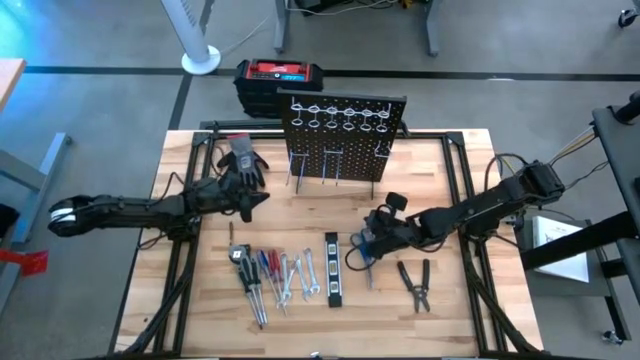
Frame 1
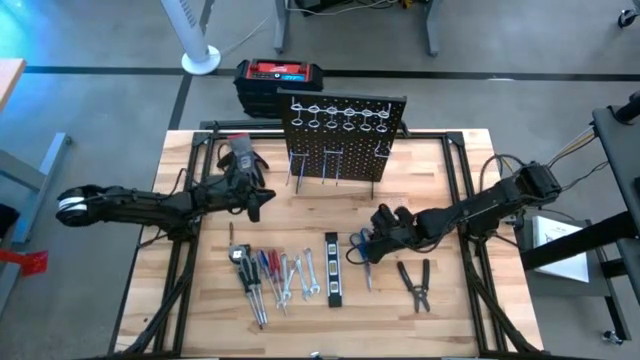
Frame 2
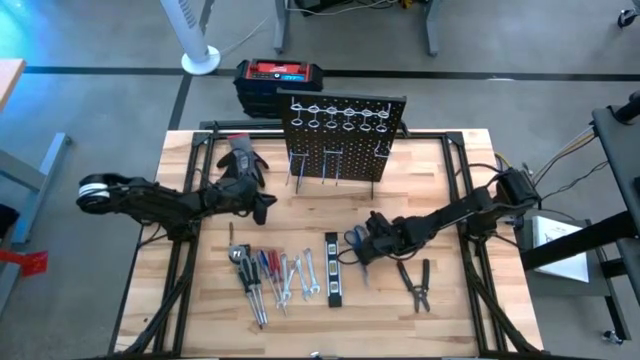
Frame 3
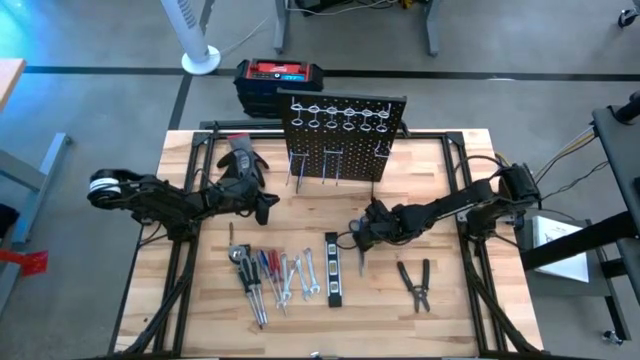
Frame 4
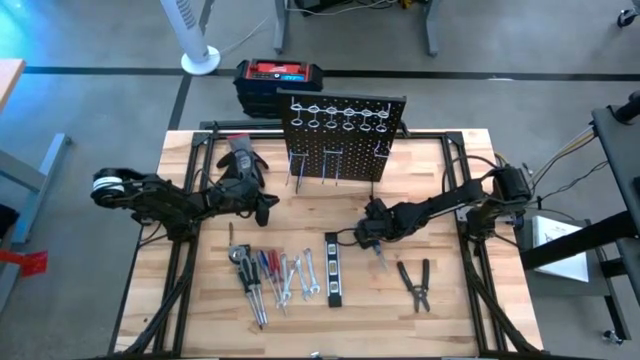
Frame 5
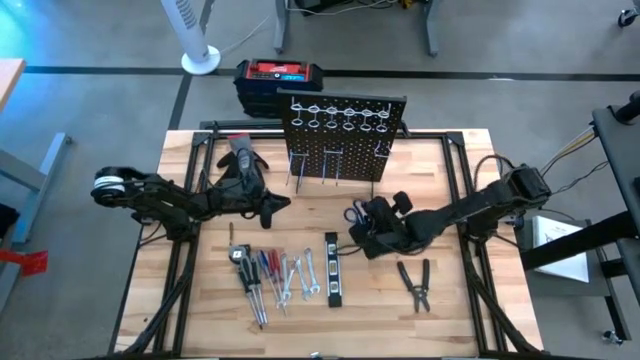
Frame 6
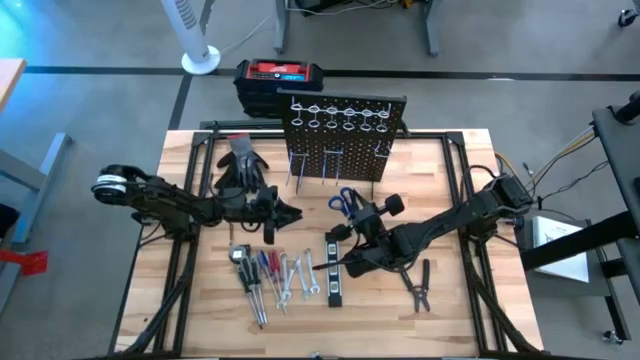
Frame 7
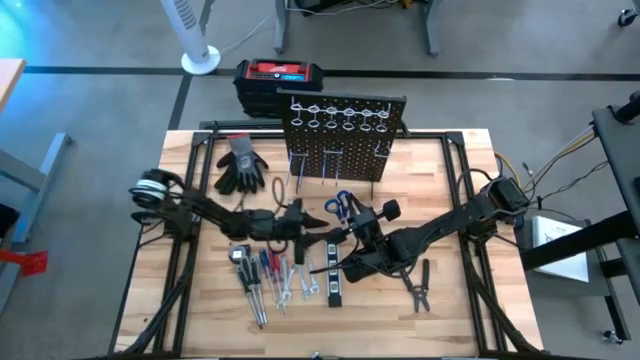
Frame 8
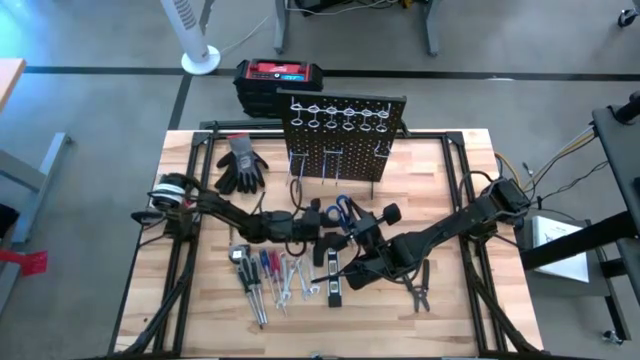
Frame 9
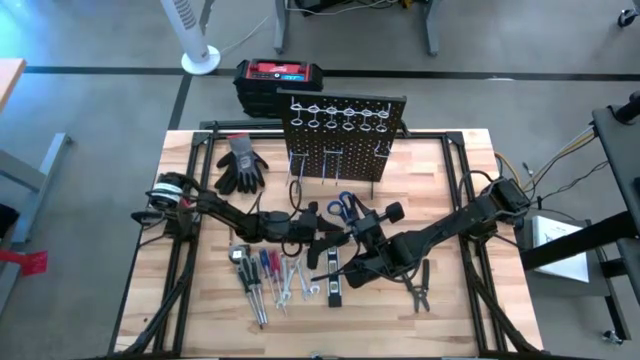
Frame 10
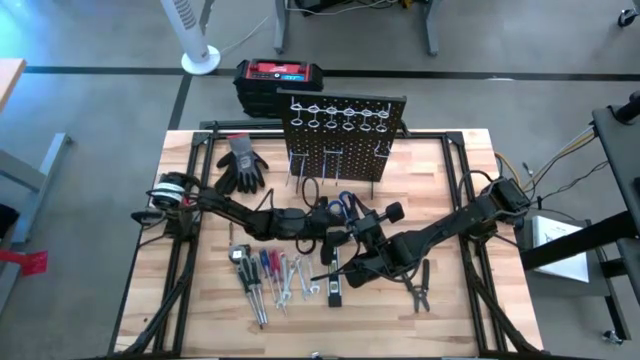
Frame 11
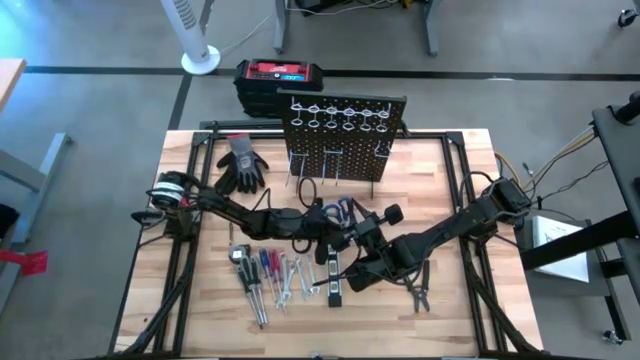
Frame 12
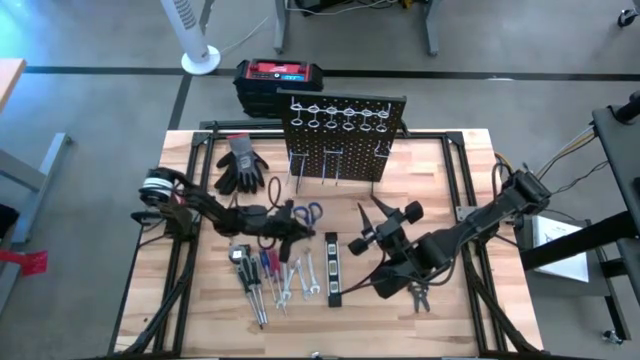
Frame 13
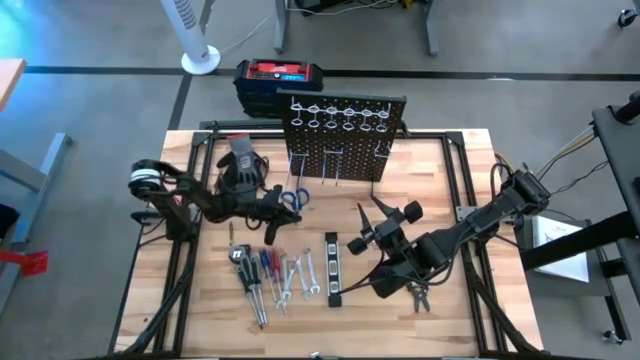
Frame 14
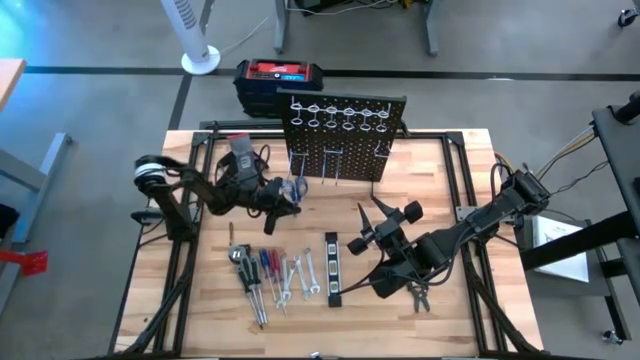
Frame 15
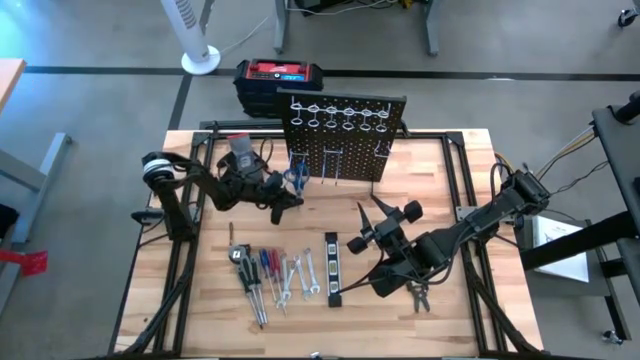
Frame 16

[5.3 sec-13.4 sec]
Task: Hang tools onto peg board
Hang the blue scissors on the peg board

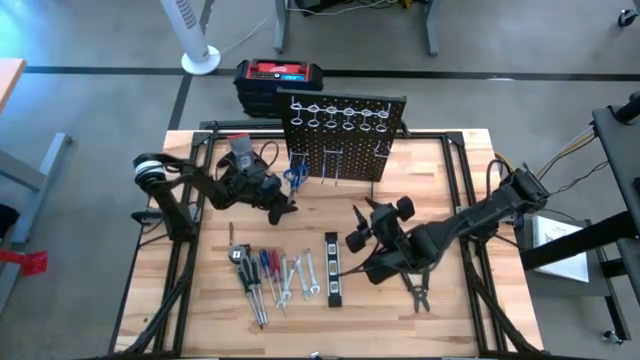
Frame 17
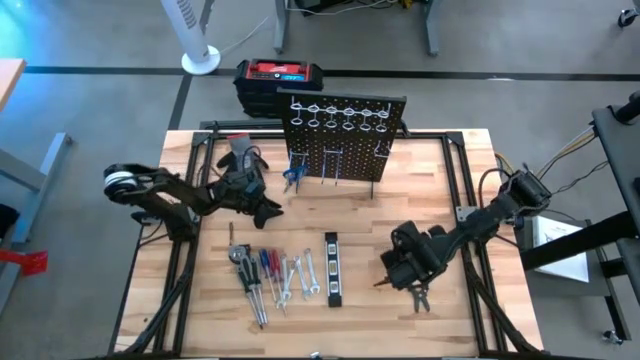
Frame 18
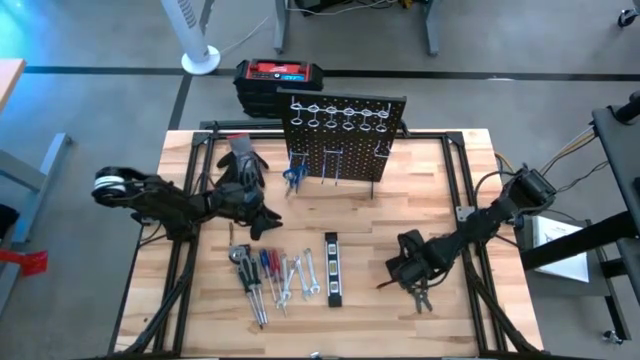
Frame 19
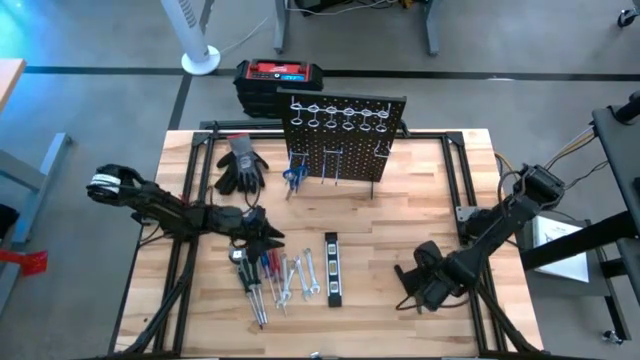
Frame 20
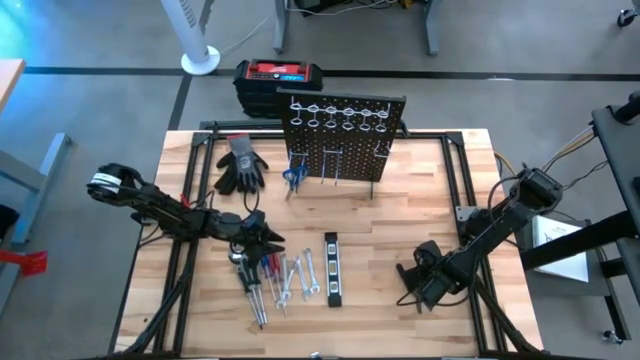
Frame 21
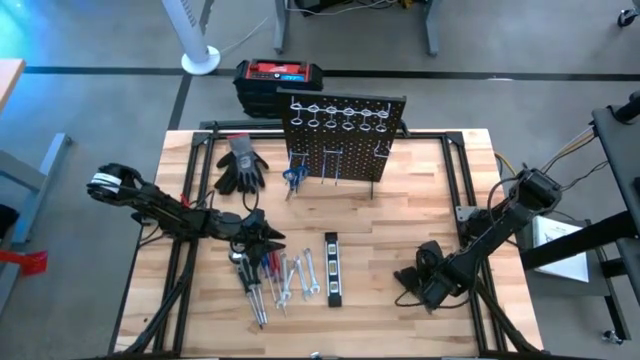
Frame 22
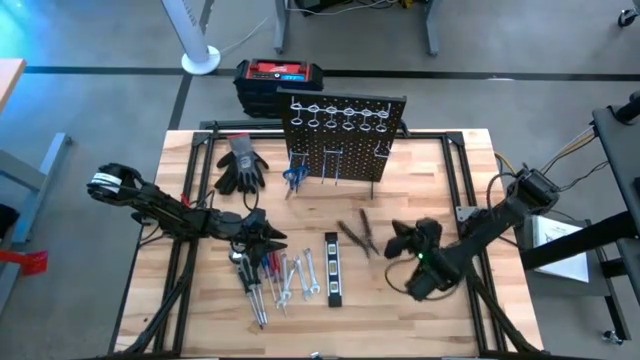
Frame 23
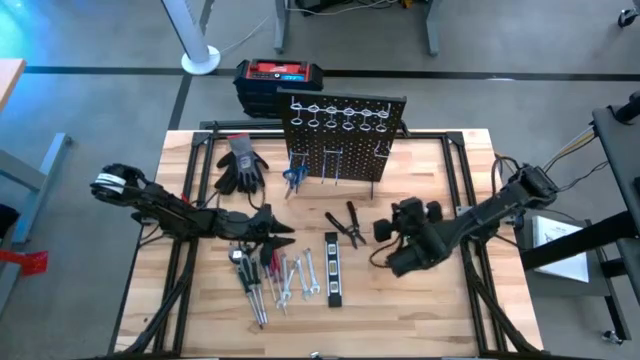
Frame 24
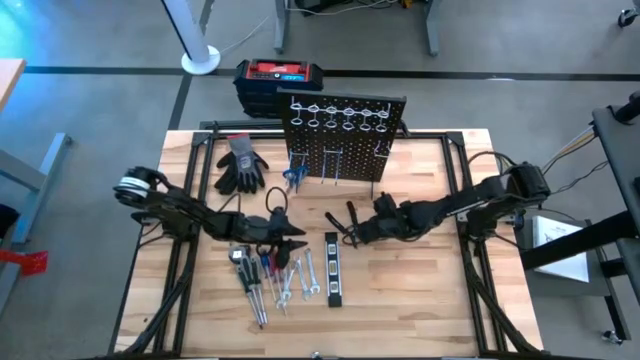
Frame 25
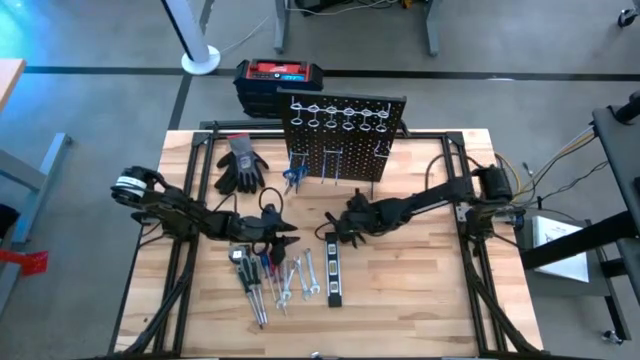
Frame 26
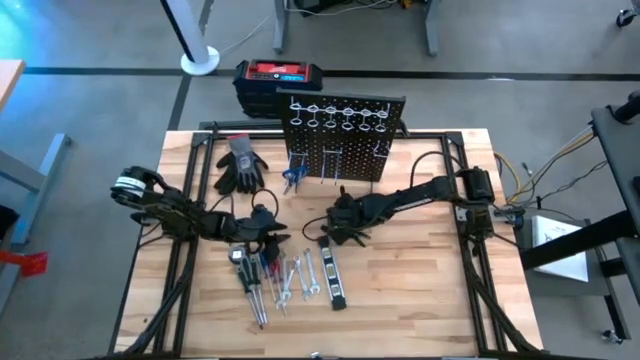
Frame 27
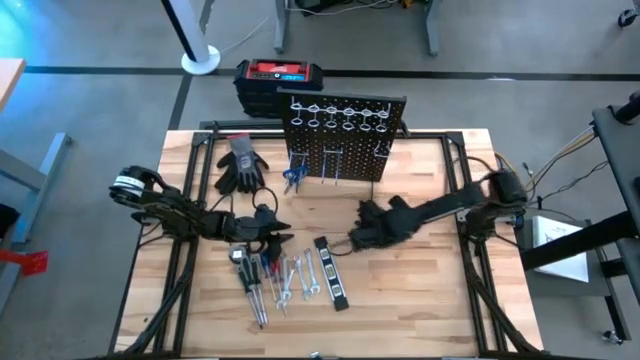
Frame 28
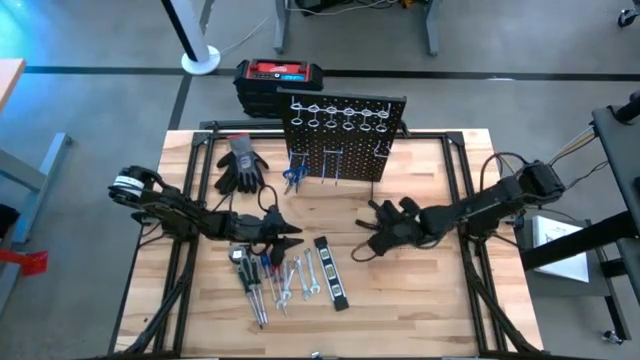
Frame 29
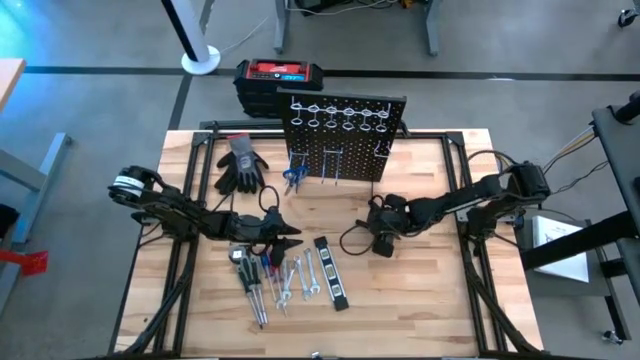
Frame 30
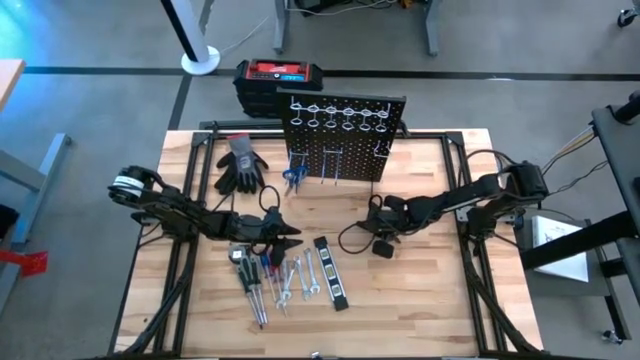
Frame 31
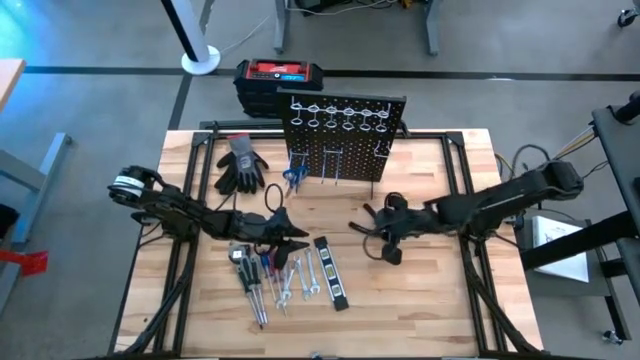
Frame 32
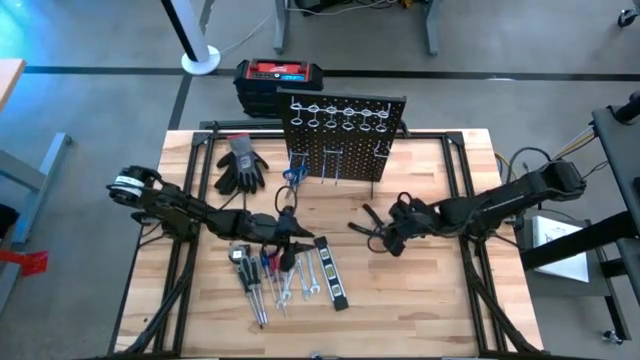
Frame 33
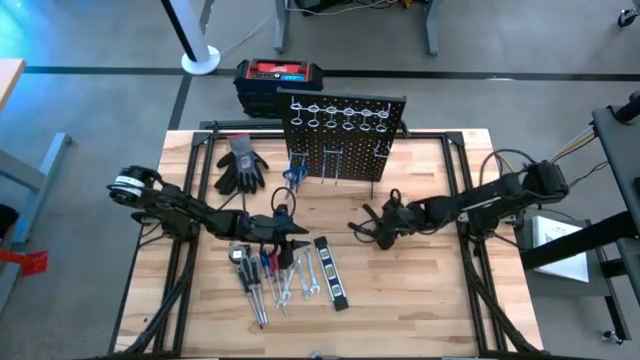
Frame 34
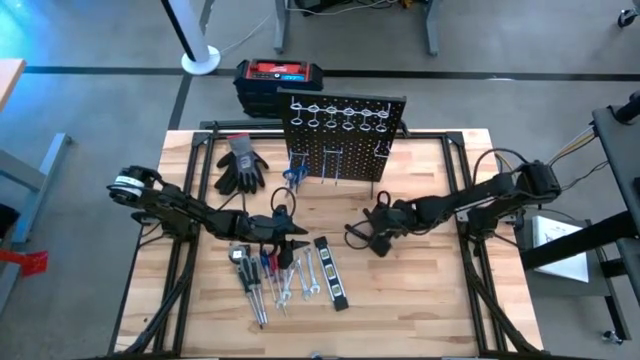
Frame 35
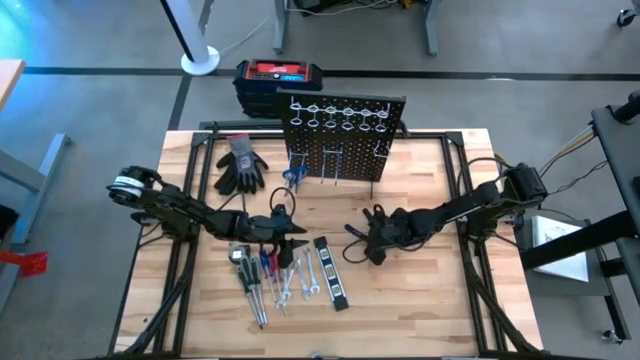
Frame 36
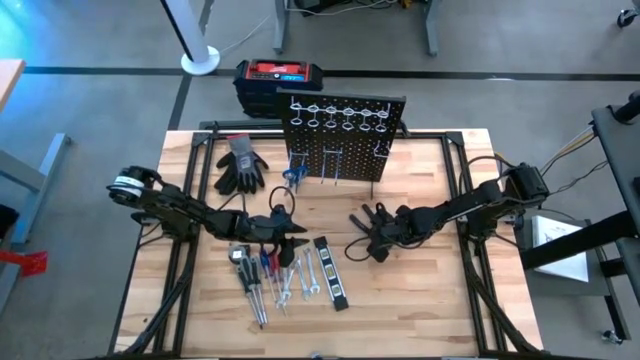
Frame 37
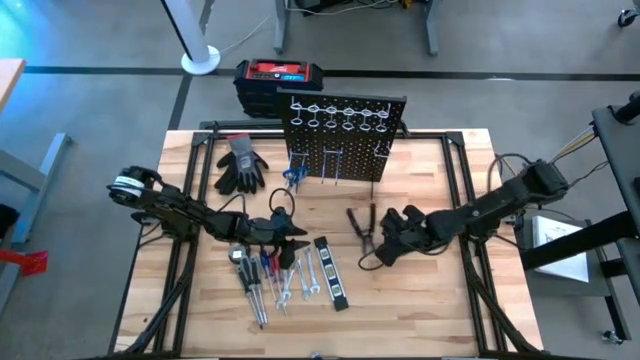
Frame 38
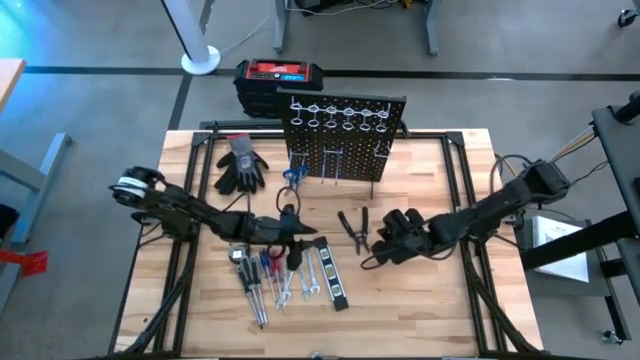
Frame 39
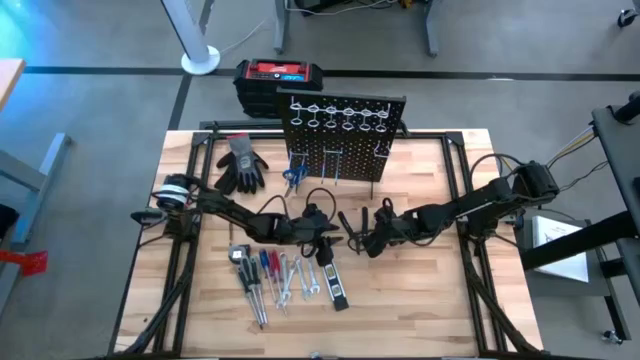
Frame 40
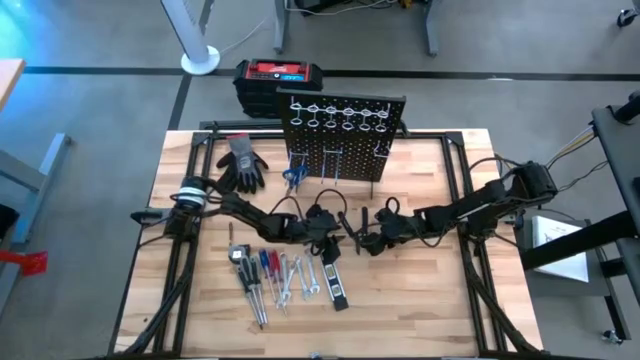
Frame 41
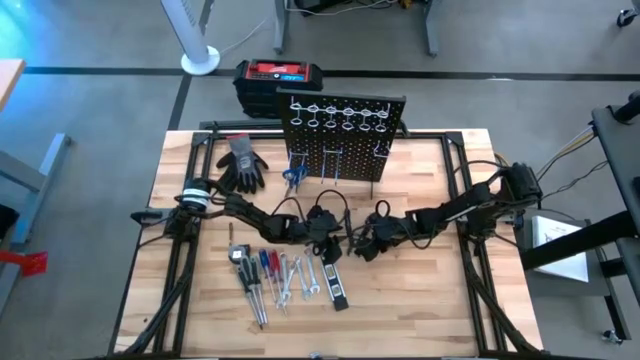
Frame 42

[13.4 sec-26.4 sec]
Hang the black stripping pliers on the peg board
